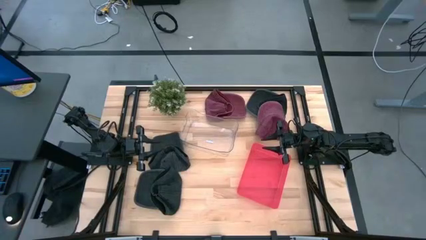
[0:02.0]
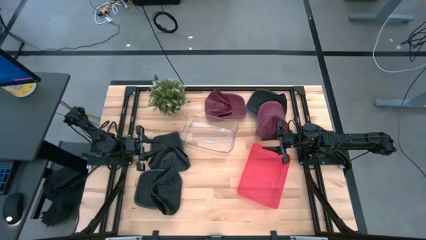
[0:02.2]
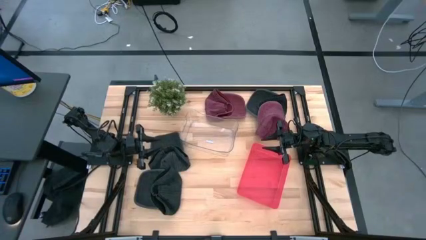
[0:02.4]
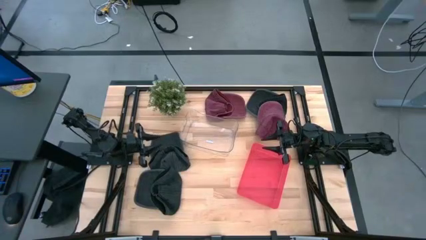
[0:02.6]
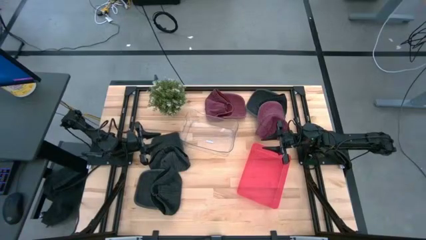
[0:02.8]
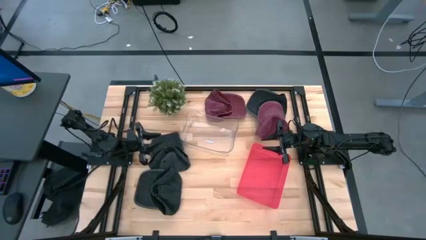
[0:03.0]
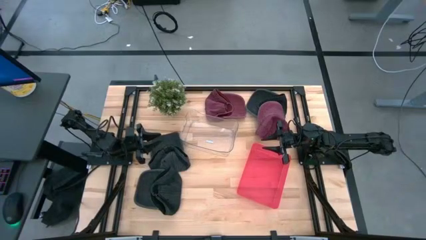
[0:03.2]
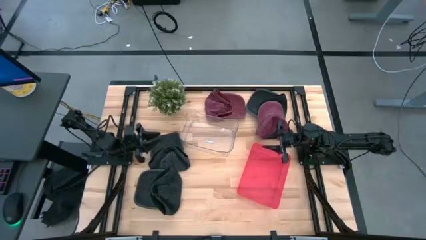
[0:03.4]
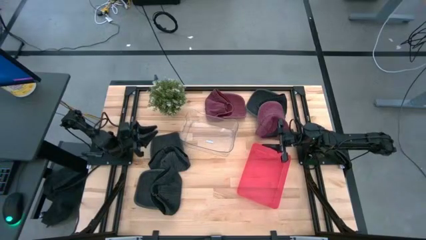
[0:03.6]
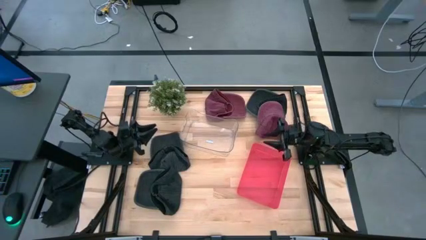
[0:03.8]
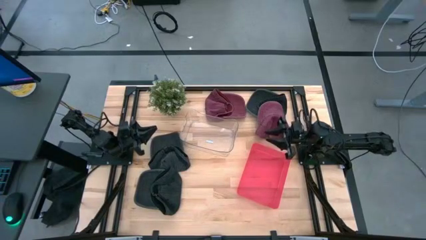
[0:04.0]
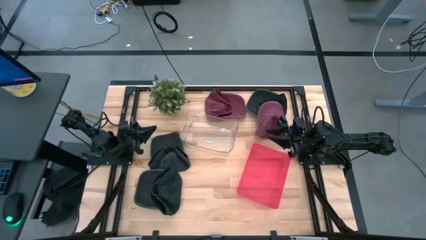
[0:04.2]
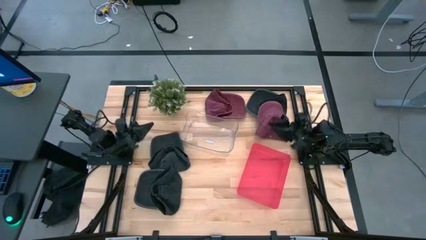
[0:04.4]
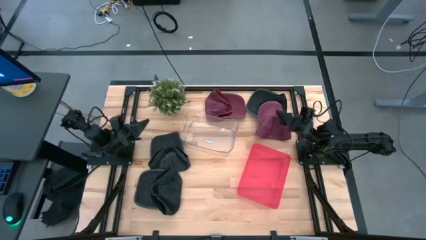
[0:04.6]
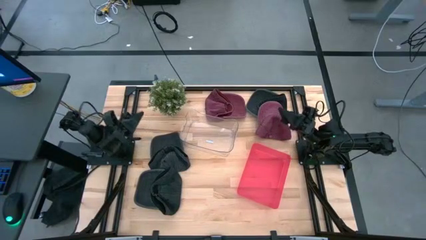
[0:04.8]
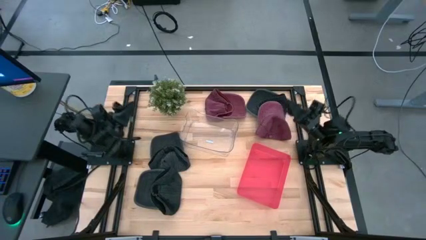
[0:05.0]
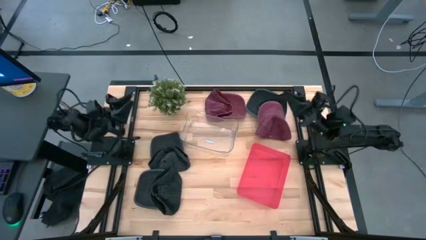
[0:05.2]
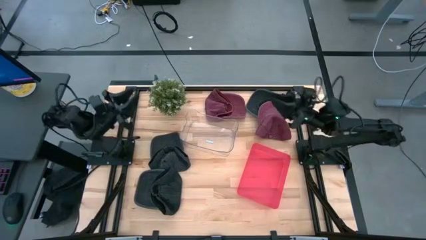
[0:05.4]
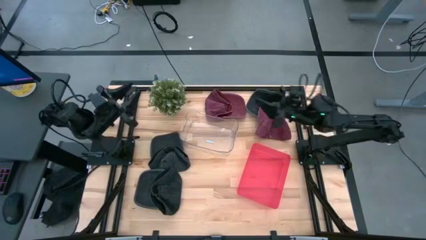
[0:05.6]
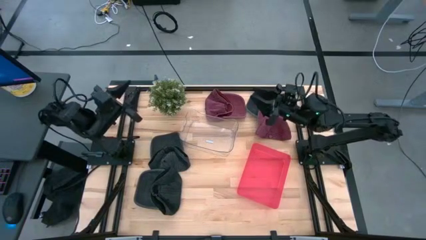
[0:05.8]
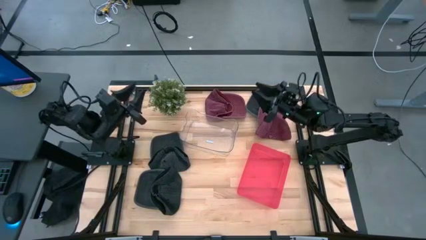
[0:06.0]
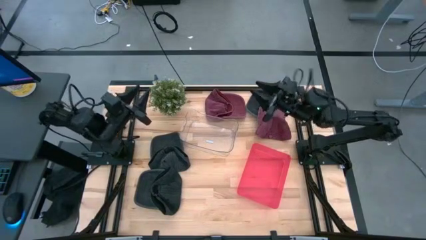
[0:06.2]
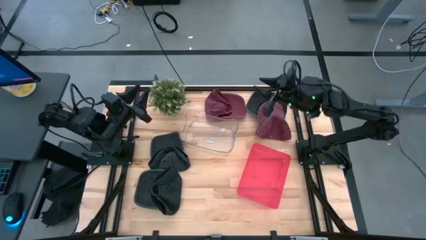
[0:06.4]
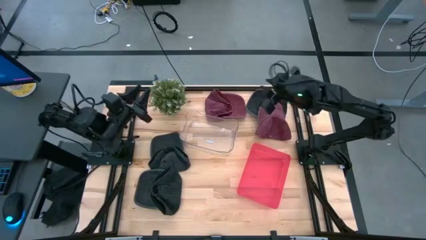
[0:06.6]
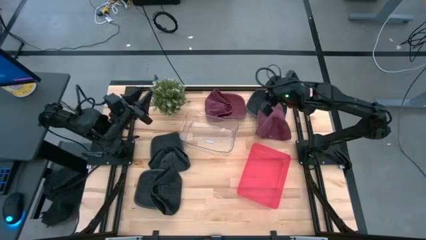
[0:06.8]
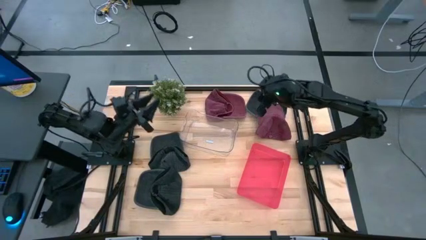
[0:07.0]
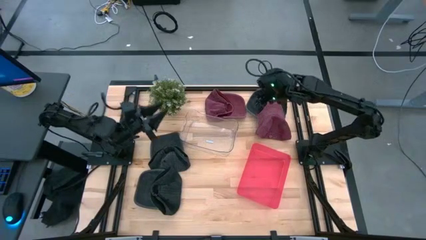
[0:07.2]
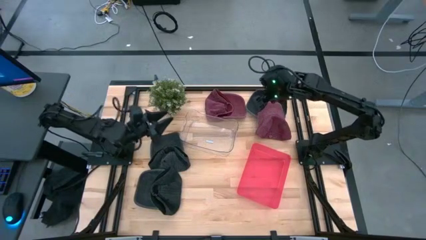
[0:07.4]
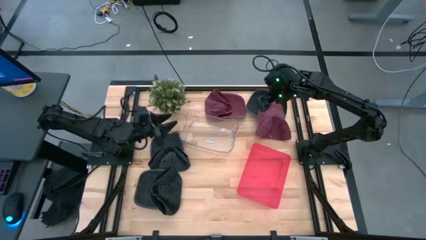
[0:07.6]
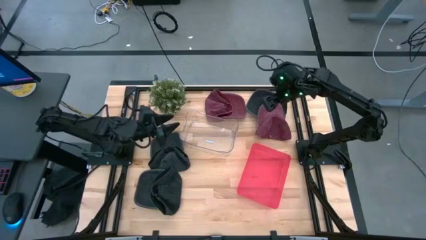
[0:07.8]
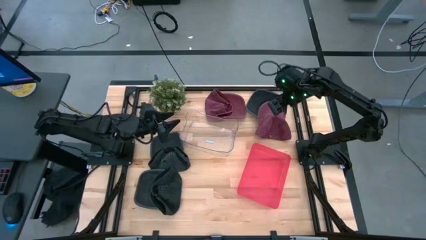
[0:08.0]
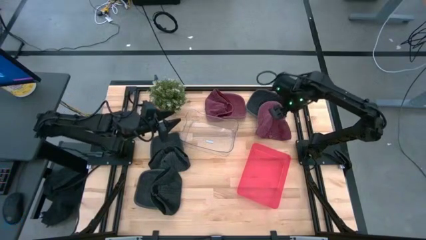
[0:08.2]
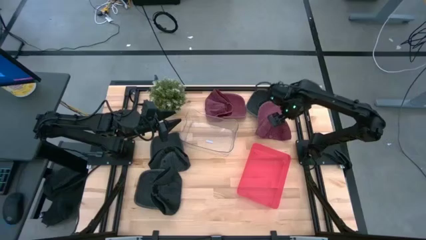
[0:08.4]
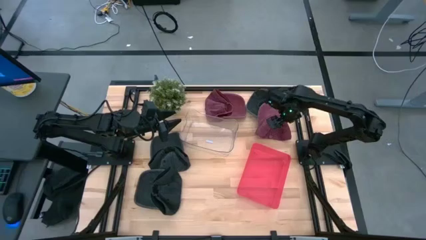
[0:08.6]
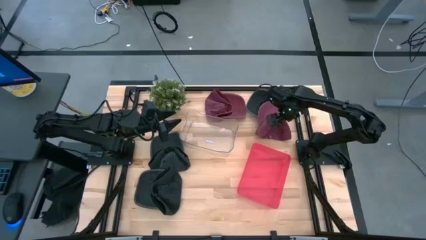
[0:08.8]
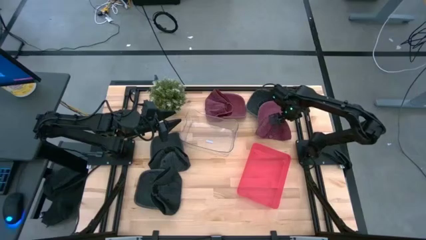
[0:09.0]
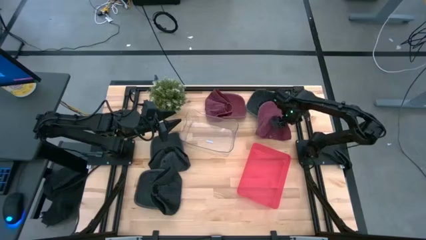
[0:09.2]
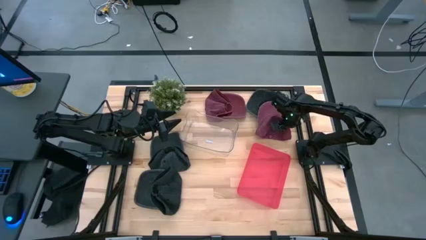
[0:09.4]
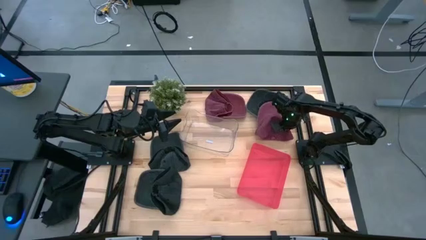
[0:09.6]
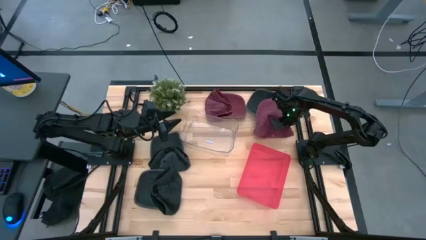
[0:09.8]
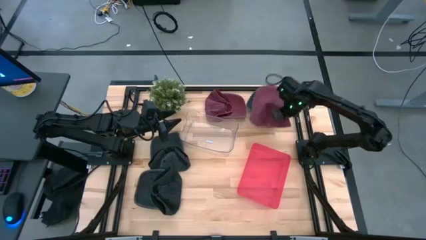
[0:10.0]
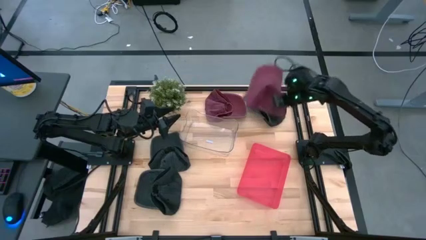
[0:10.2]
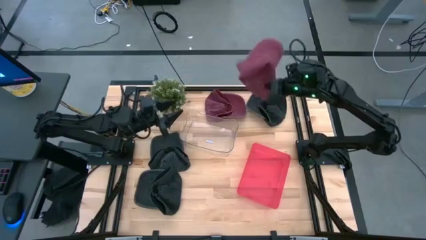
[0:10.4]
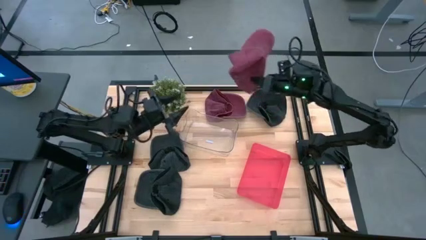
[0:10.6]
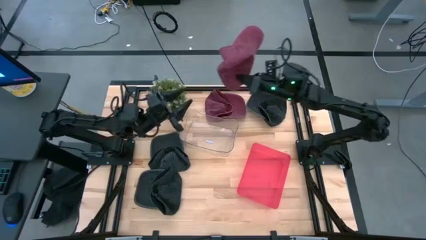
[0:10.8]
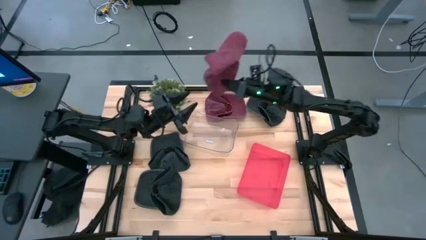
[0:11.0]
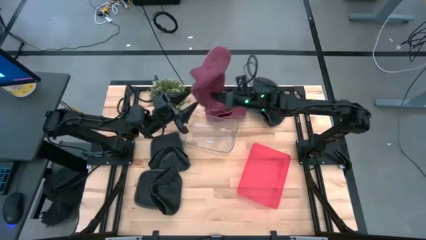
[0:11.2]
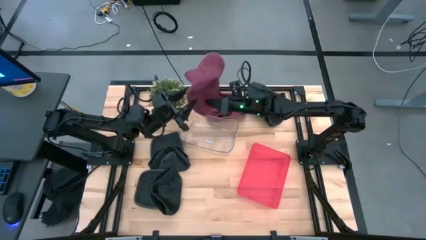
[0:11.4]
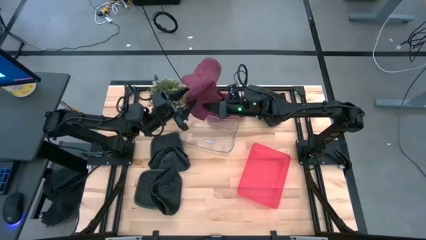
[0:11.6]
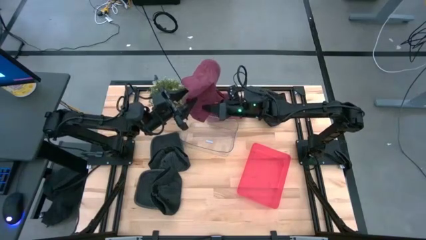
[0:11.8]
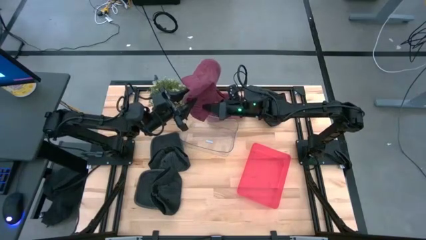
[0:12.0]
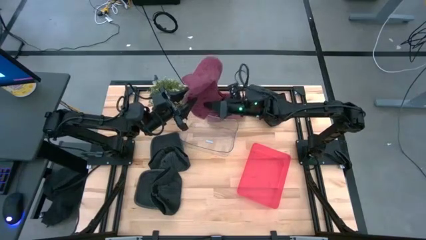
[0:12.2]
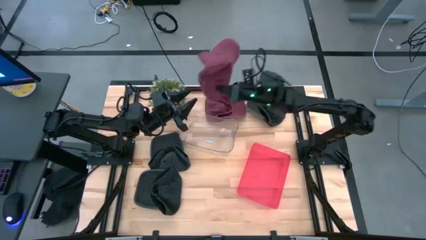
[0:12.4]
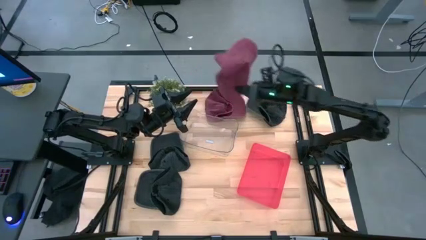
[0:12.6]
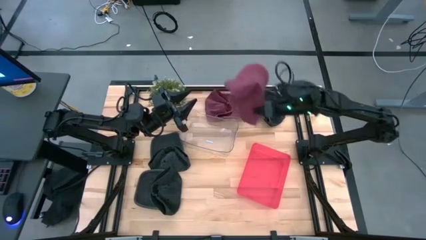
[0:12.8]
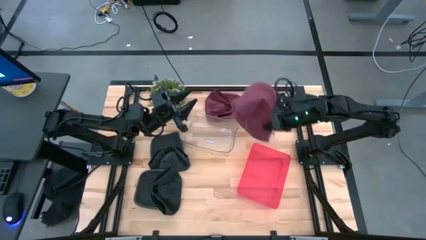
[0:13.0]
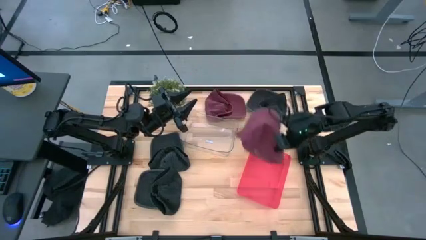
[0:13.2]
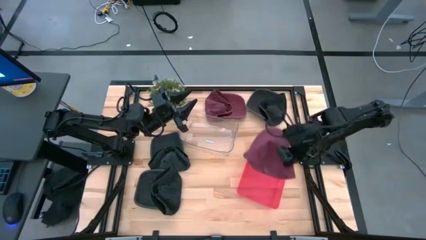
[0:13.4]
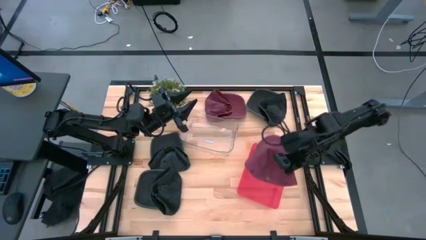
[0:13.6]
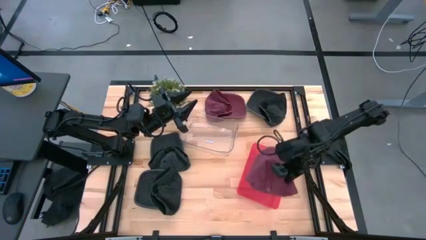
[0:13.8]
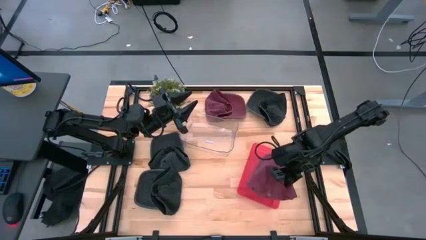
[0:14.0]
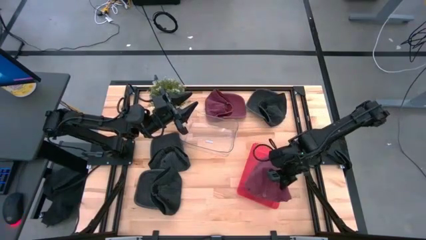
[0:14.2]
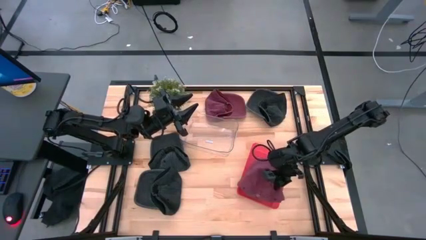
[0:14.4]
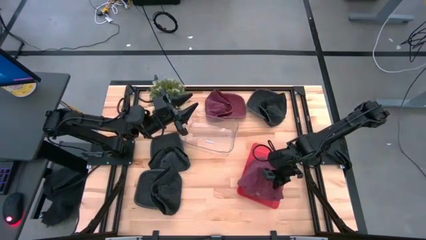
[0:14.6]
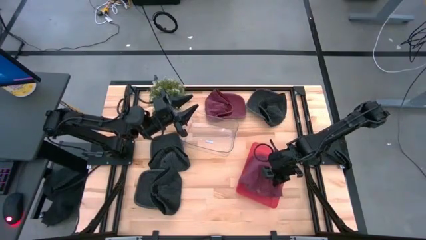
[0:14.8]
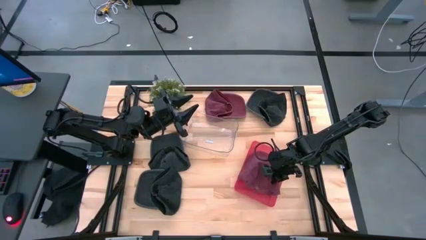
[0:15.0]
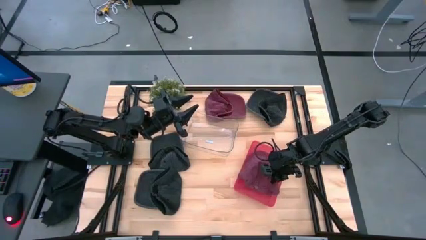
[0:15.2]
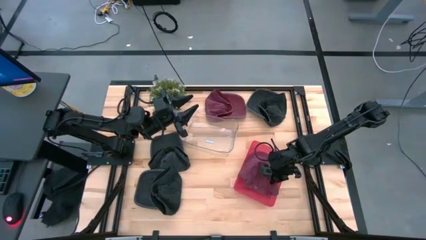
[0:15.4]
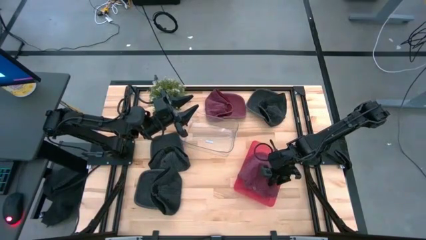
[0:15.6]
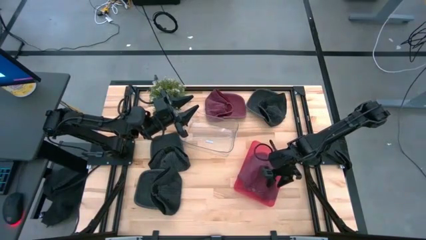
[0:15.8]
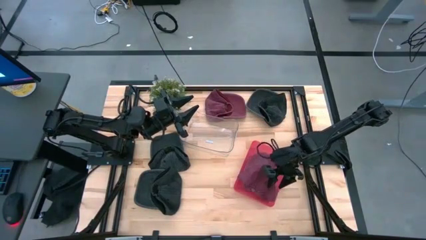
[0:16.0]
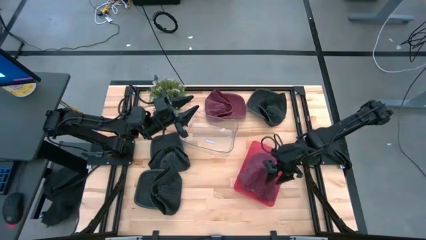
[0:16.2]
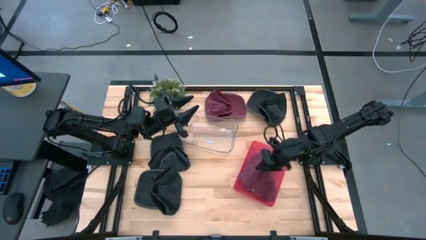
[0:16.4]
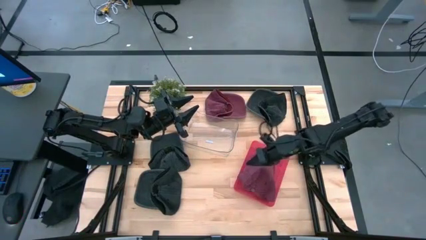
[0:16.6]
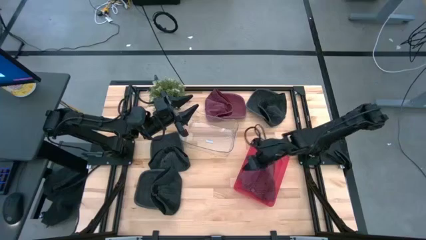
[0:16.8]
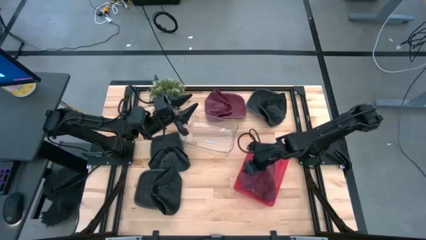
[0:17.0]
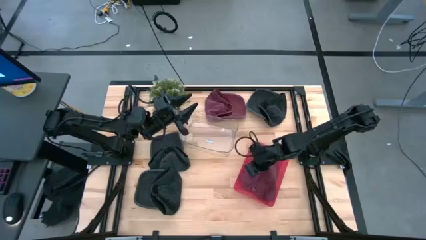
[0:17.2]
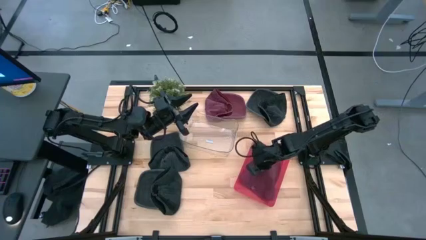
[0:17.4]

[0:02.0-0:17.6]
Task: Pick & Place hat
Put the right red cap into the red bin
